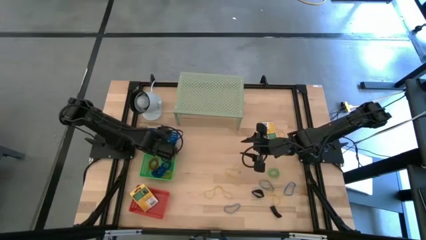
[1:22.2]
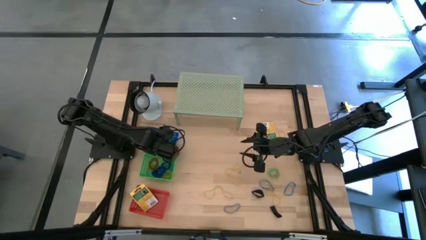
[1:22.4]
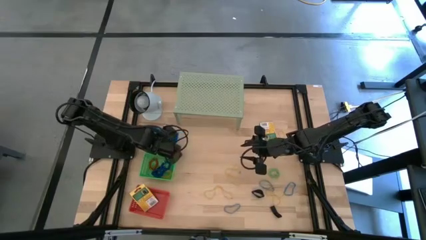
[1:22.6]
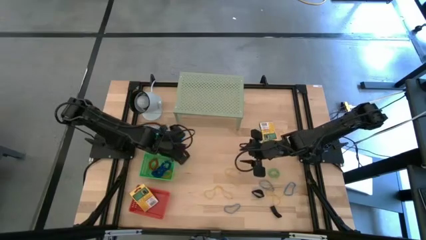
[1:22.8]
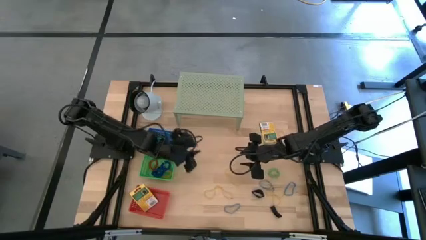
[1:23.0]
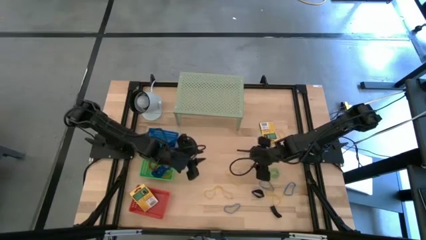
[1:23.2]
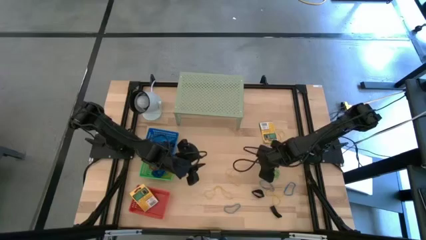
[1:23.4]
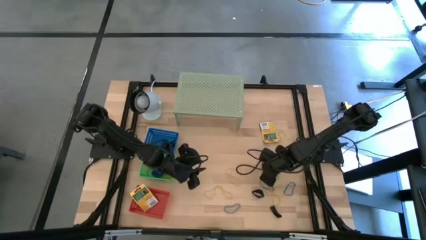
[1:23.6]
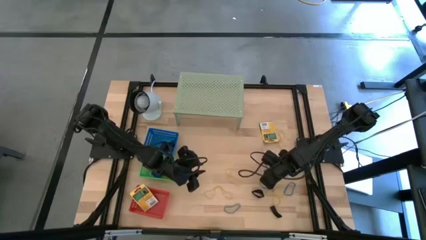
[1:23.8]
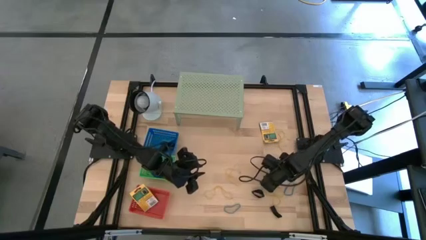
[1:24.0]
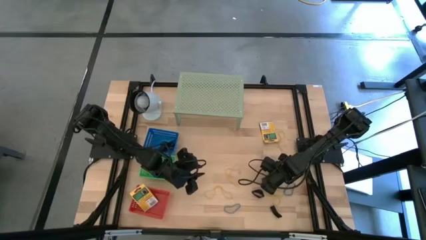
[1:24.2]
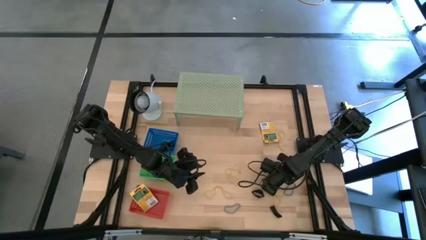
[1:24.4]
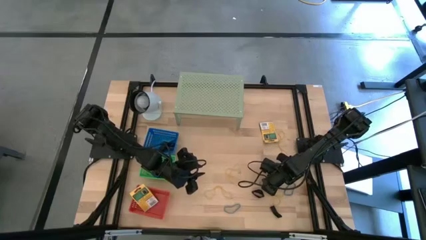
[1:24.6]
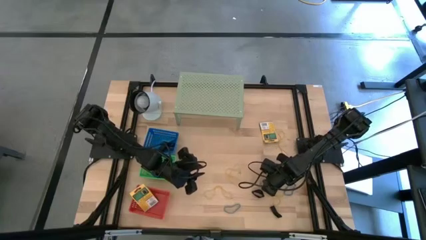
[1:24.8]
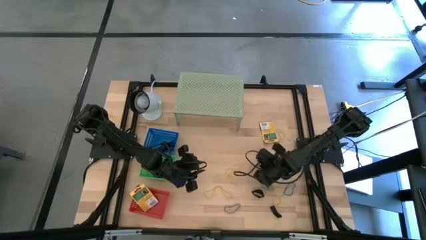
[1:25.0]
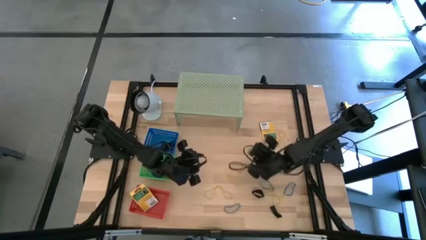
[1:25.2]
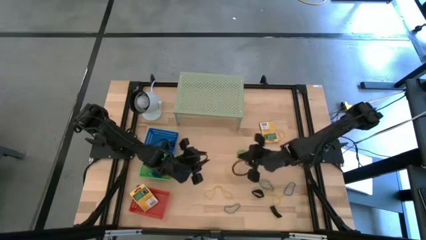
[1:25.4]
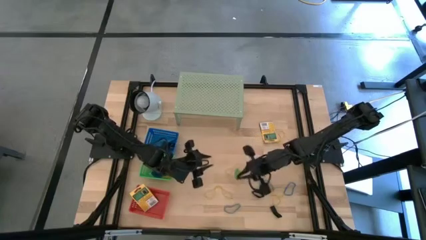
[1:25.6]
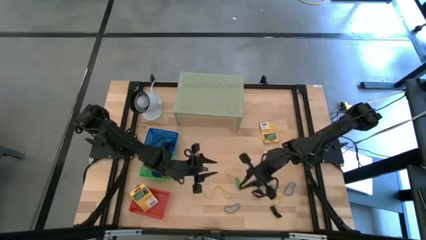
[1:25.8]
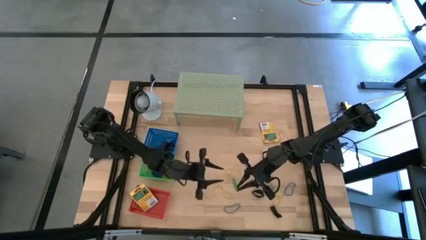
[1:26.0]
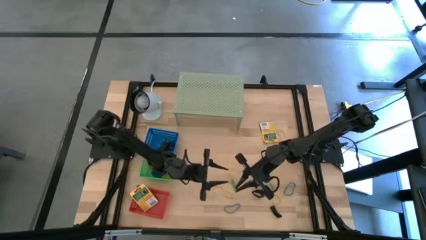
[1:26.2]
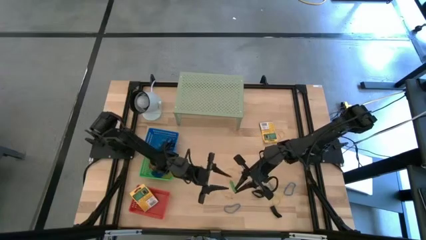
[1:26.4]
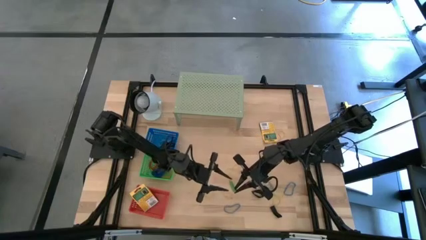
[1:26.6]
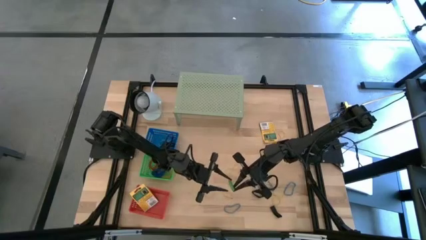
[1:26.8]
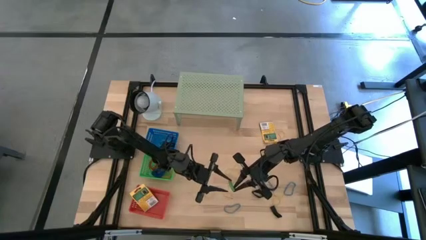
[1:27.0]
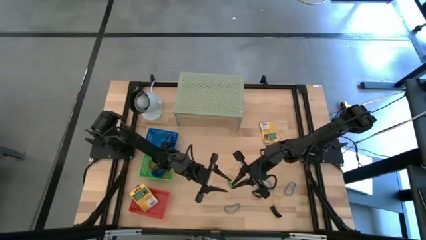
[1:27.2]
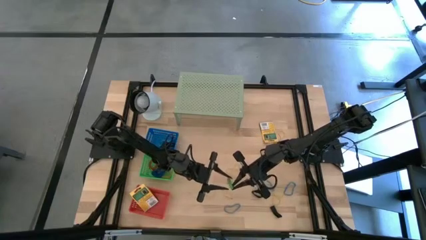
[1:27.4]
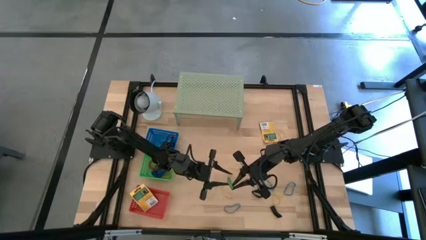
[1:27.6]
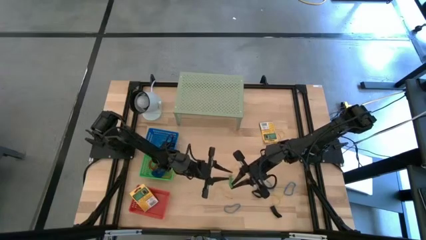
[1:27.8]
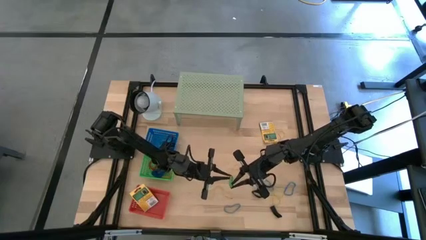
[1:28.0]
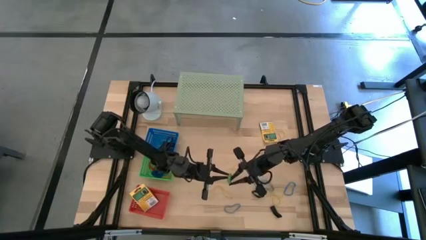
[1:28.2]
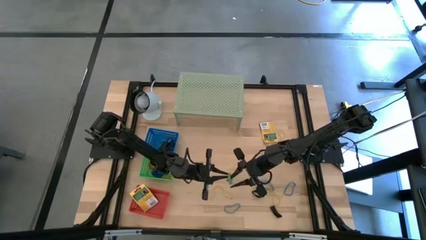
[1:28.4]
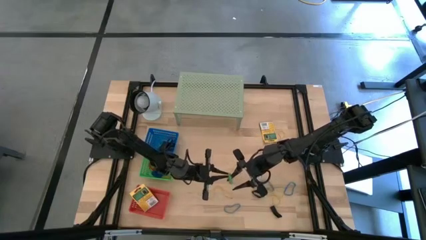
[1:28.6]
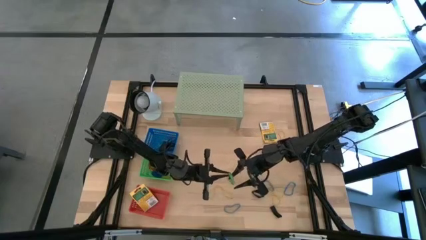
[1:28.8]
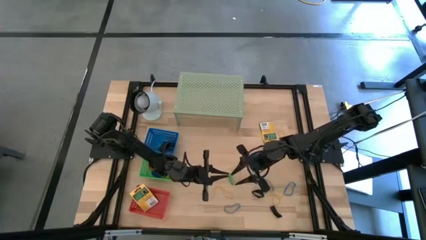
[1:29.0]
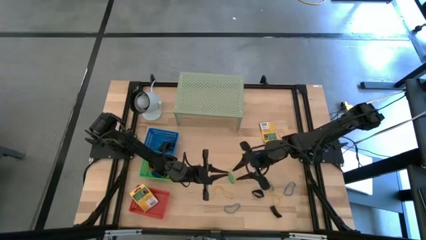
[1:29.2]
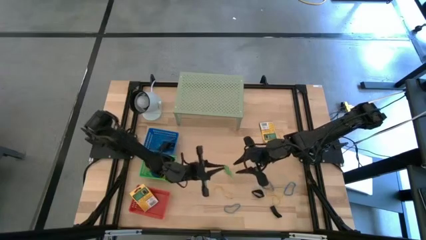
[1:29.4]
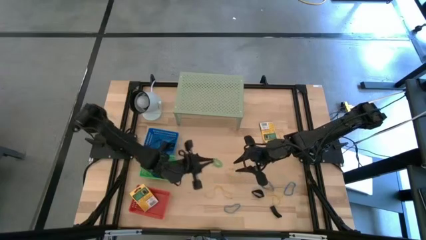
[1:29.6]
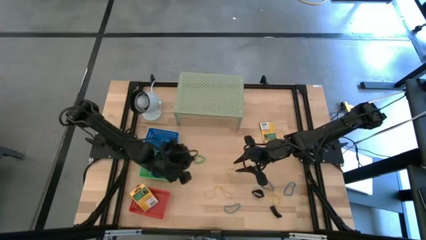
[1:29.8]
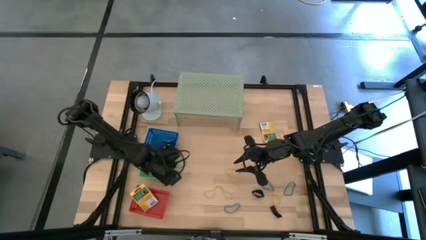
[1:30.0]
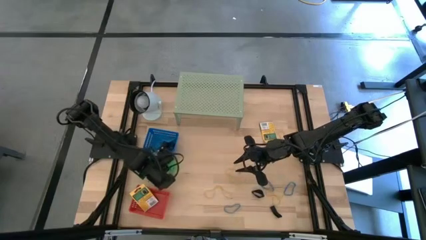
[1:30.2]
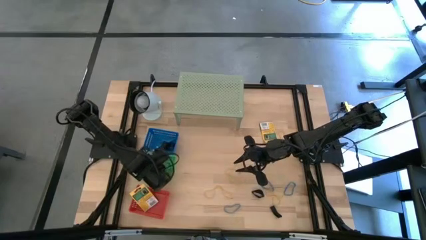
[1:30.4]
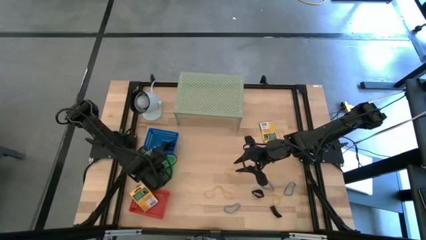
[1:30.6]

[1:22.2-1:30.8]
Task: Pick & Place Office Desk Supplies
Put the green spring keychain into the green bin

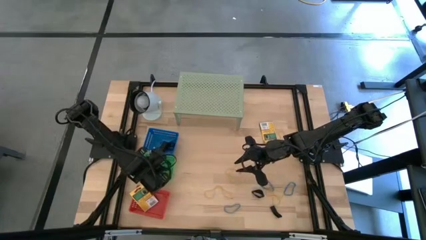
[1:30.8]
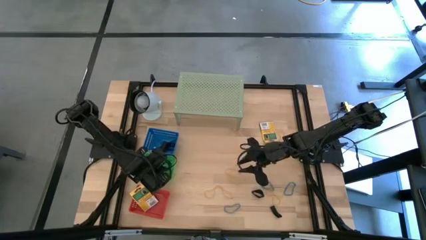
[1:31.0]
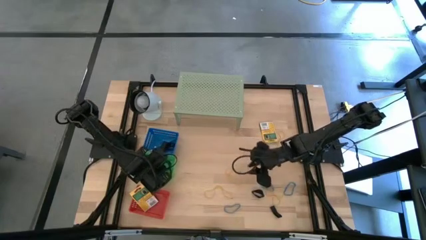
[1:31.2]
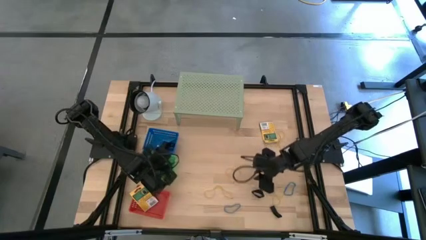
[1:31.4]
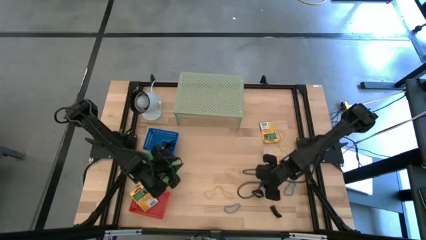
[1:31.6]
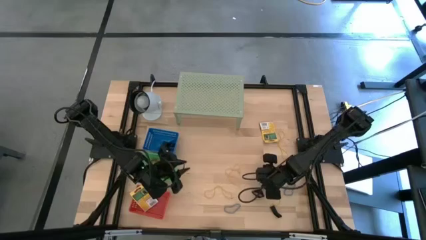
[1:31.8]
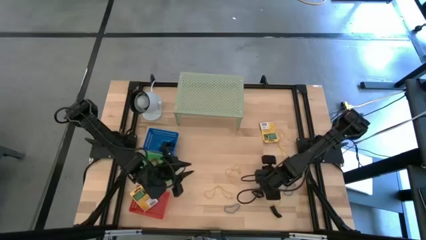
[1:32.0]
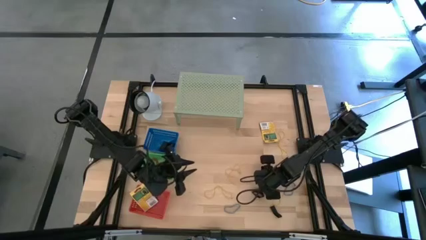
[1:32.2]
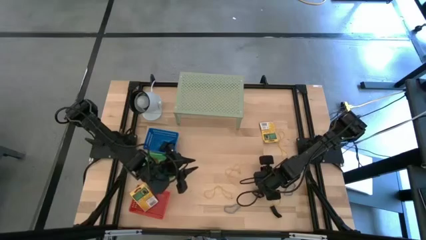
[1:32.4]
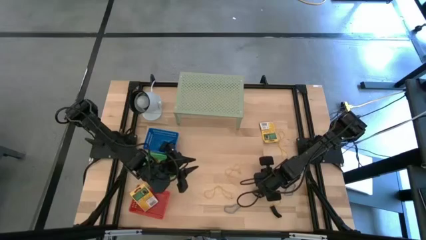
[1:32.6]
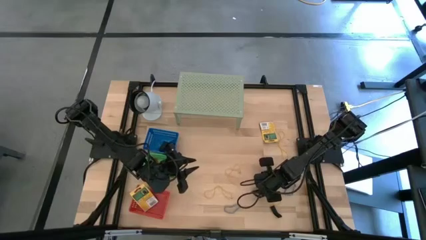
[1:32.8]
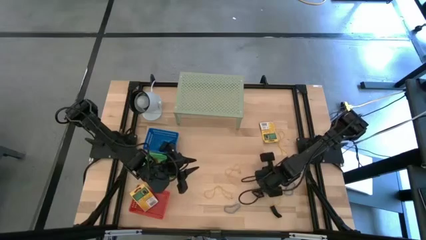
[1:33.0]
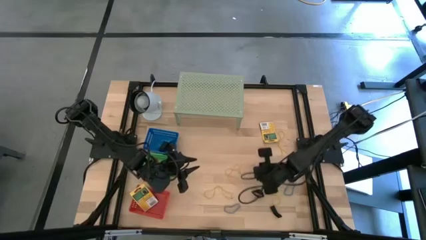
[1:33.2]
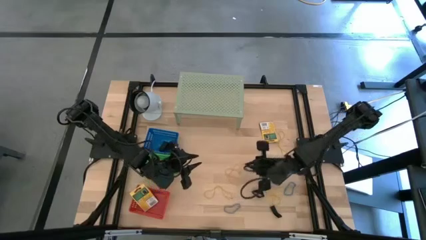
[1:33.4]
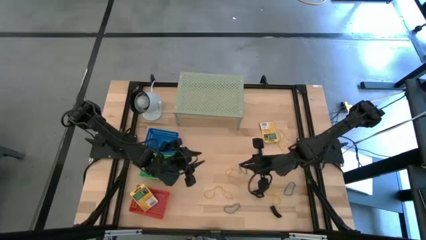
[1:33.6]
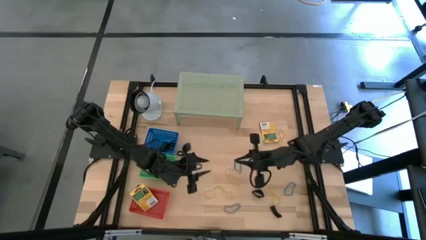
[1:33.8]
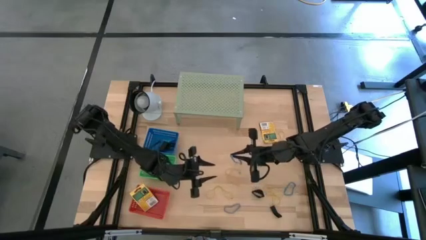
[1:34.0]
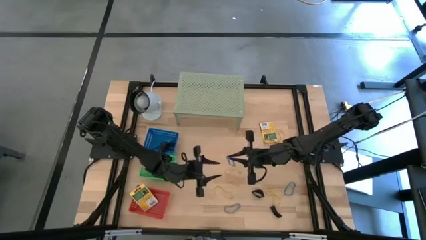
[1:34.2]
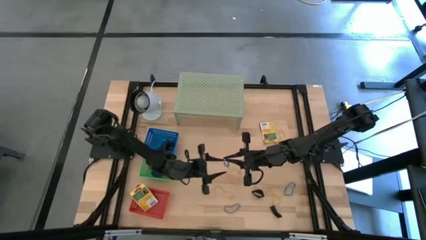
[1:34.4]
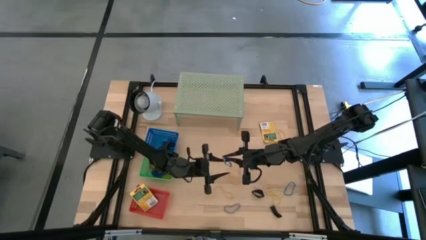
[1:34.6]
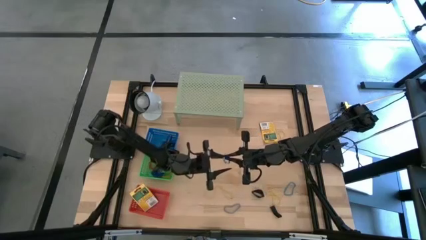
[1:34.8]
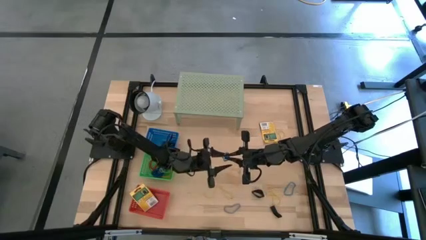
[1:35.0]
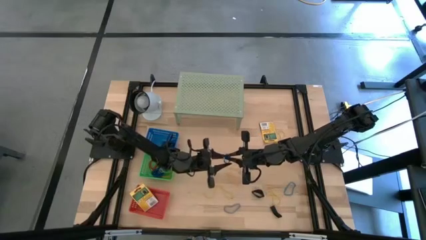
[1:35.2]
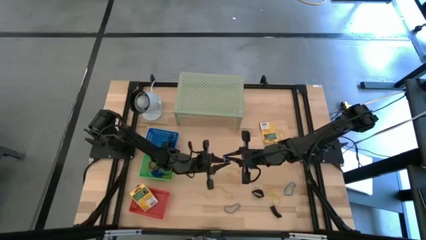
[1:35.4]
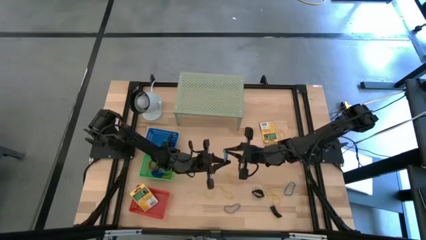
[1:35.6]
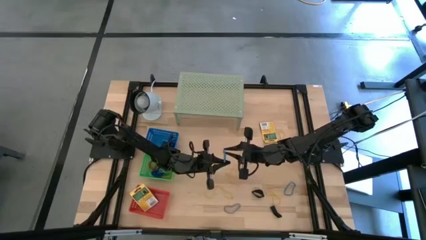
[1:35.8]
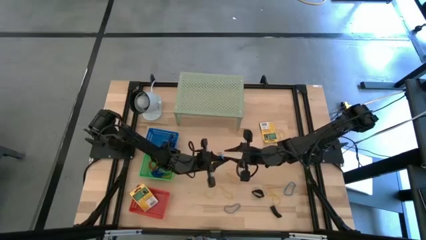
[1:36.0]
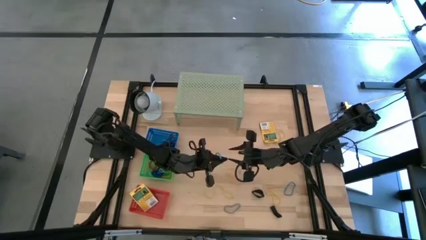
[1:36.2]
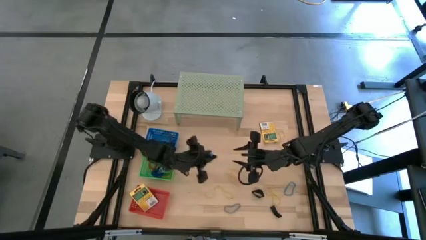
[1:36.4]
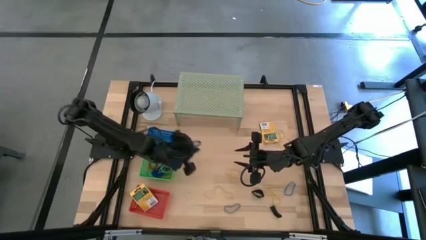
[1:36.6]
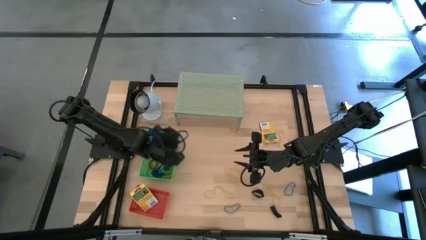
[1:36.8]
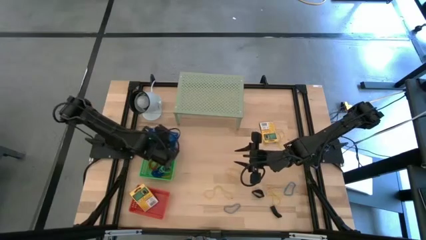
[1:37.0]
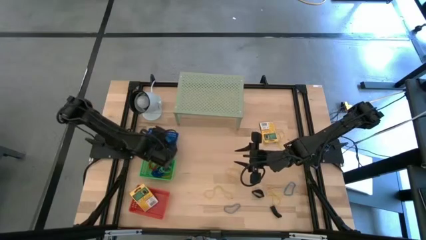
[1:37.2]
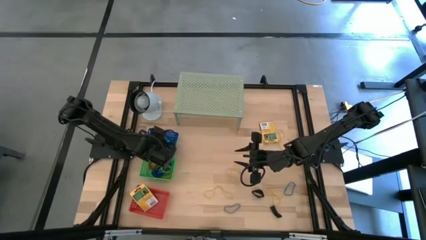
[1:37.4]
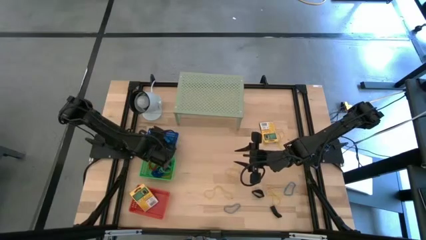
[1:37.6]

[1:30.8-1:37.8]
Put the blue rubber band into the blue bin

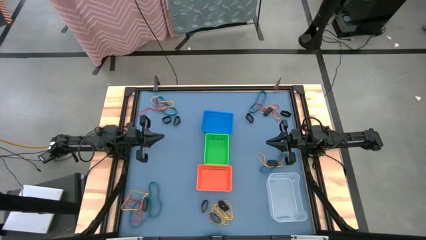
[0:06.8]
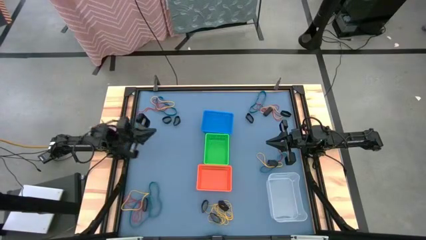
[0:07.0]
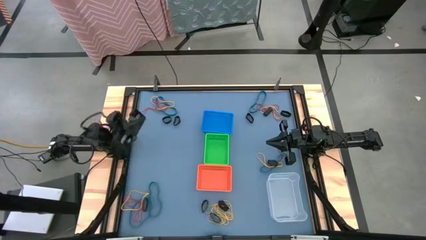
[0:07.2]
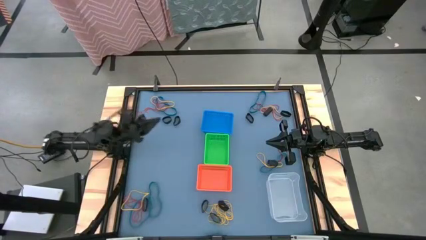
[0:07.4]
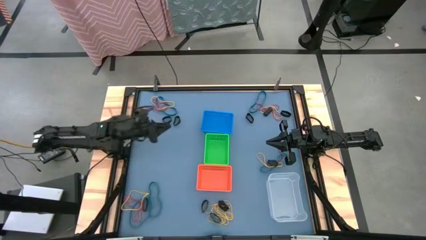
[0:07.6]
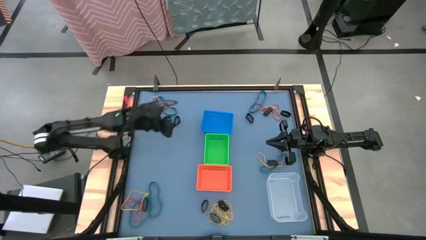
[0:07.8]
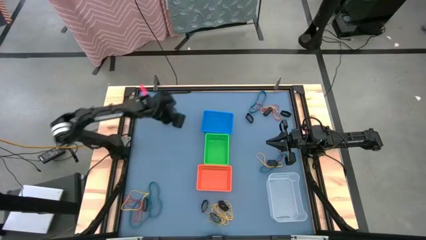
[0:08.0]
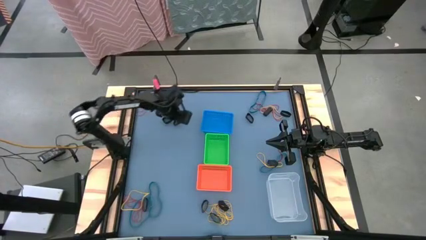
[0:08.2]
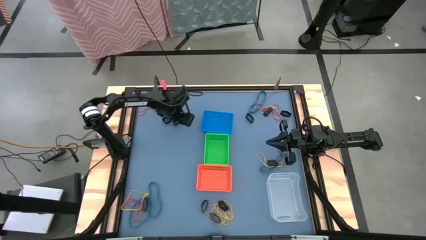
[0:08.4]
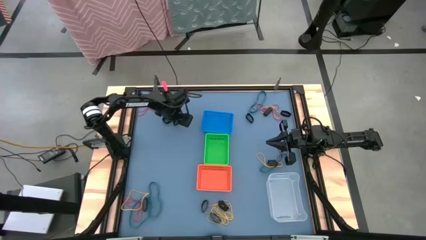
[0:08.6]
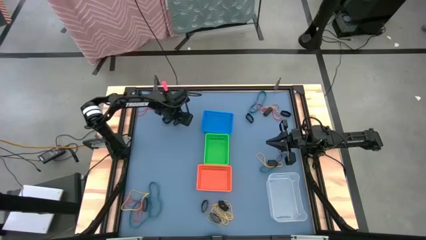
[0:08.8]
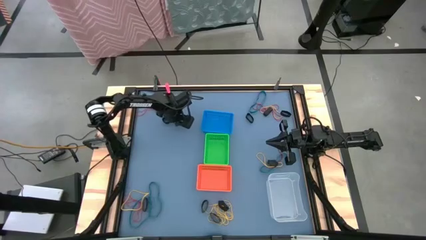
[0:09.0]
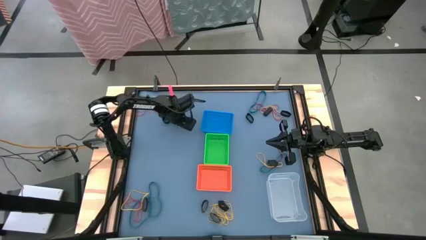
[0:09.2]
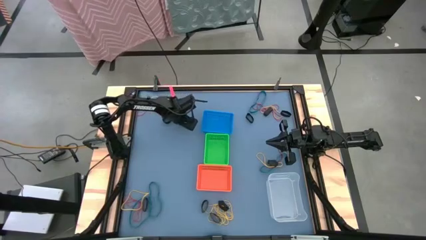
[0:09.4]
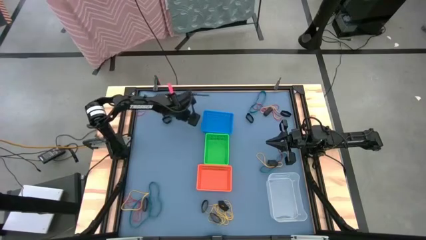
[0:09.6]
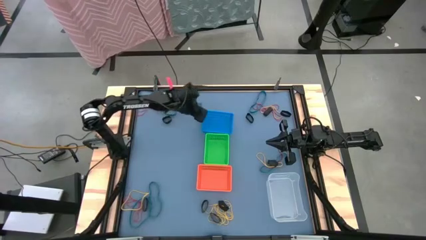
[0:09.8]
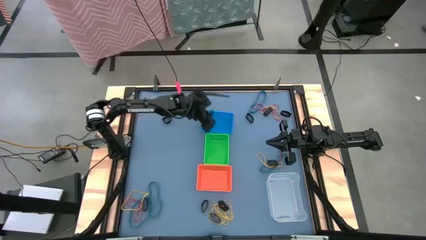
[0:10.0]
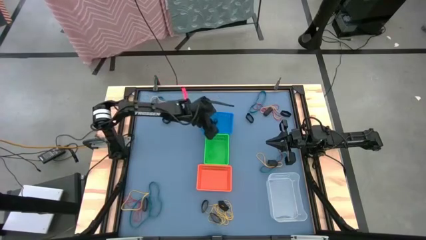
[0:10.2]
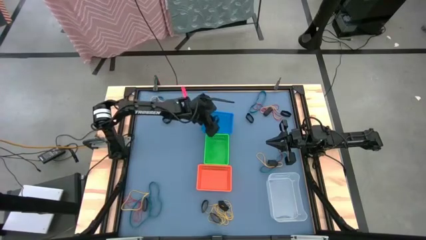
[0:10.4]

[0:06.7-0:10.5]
Task: Sort rubber bands into baskets
Put the black rubber band into the blue bin
